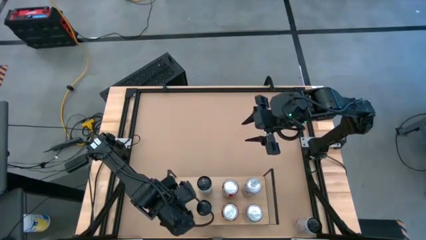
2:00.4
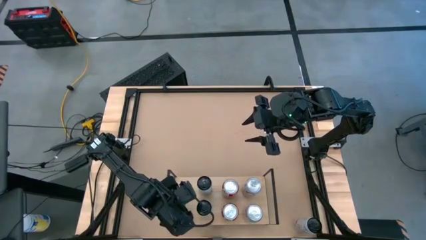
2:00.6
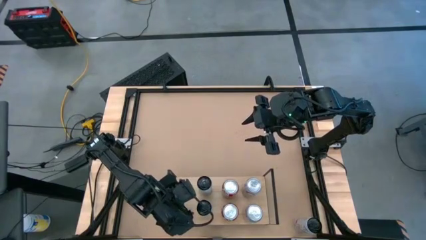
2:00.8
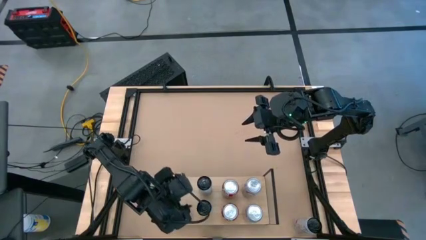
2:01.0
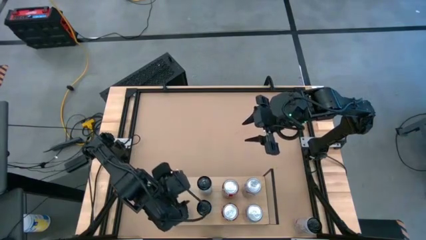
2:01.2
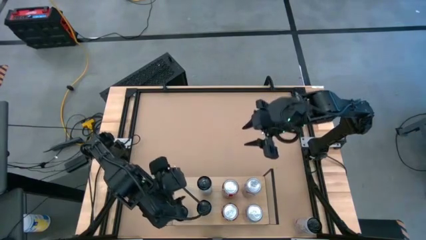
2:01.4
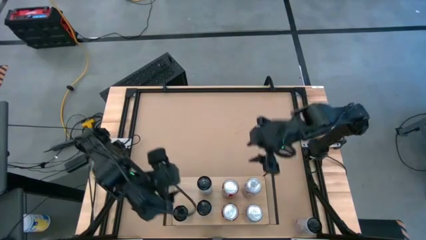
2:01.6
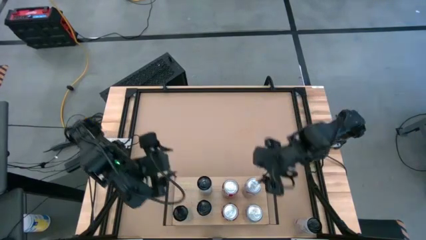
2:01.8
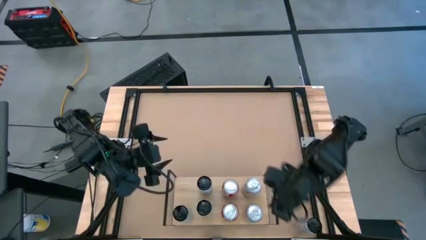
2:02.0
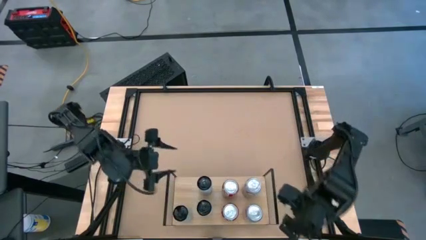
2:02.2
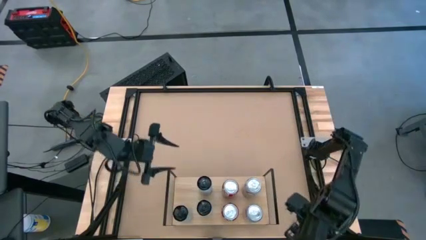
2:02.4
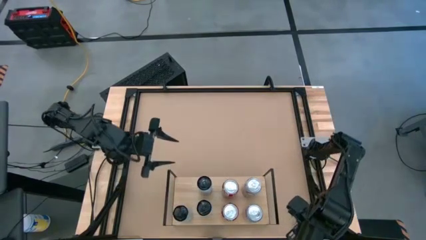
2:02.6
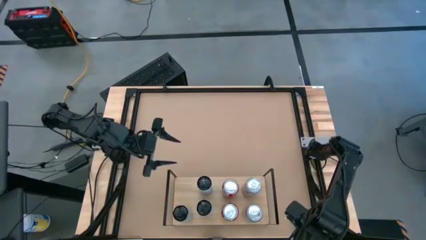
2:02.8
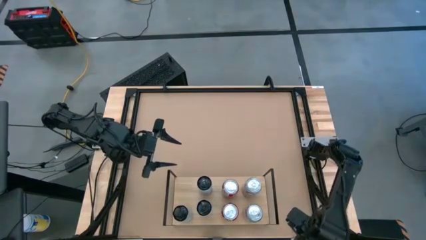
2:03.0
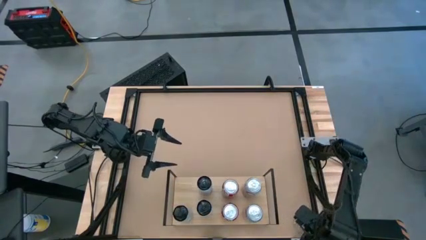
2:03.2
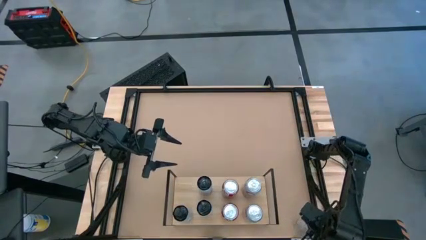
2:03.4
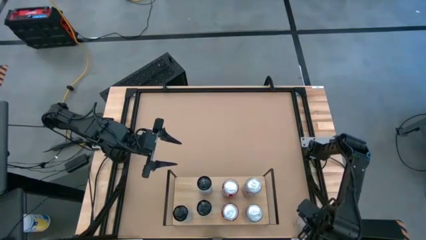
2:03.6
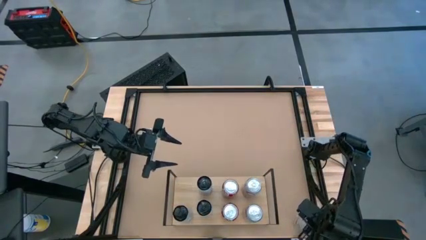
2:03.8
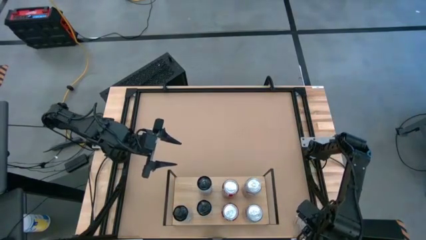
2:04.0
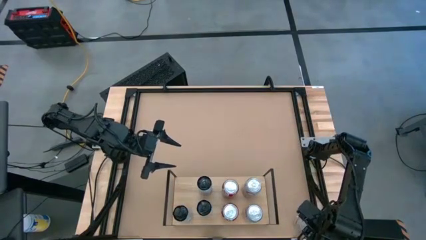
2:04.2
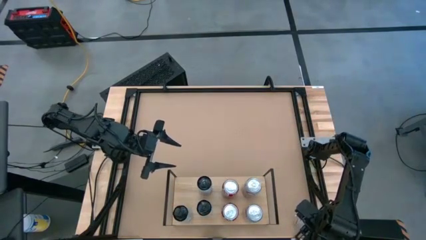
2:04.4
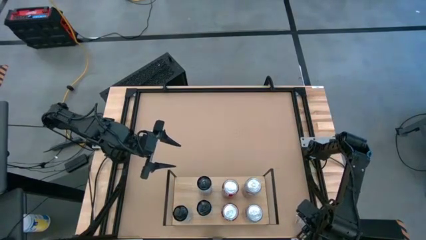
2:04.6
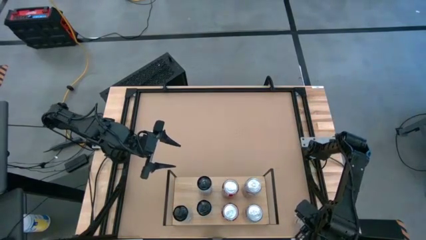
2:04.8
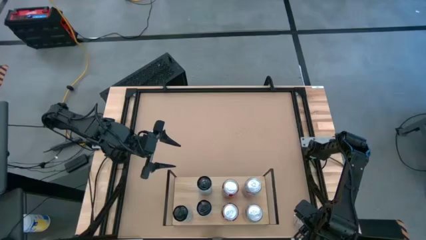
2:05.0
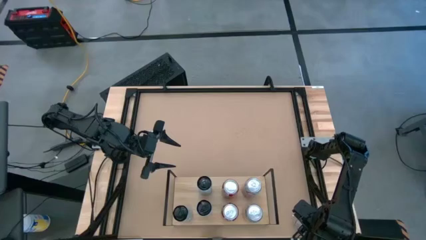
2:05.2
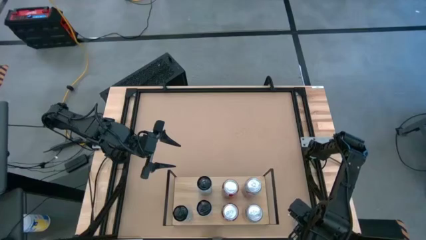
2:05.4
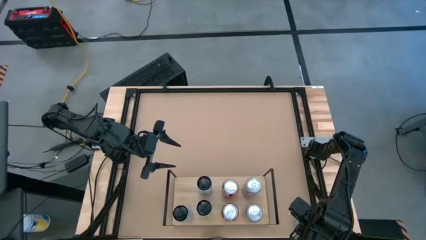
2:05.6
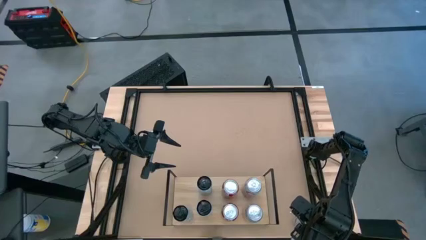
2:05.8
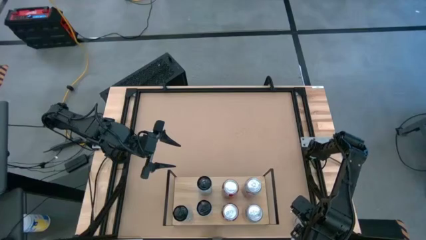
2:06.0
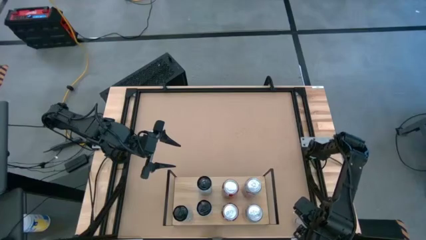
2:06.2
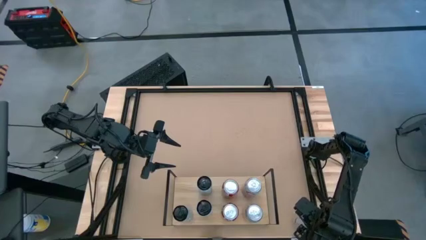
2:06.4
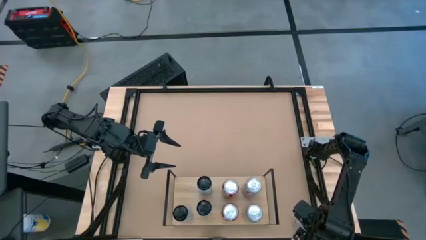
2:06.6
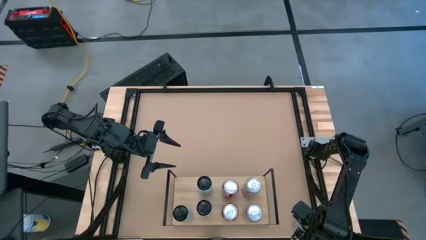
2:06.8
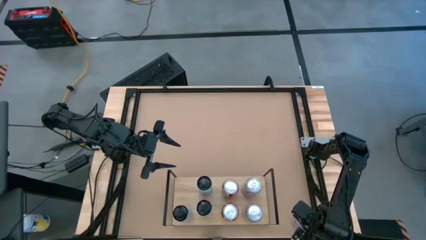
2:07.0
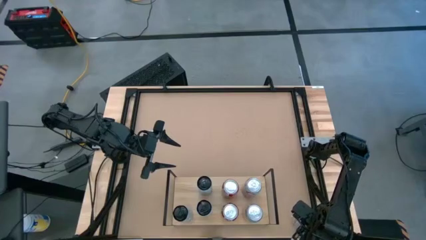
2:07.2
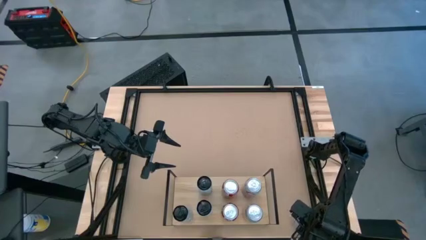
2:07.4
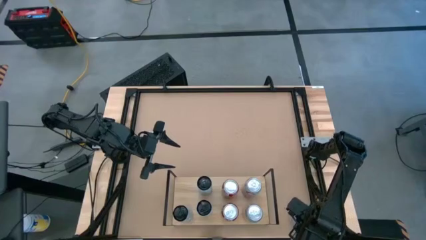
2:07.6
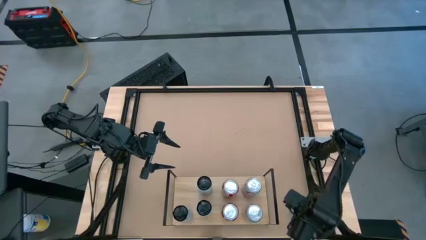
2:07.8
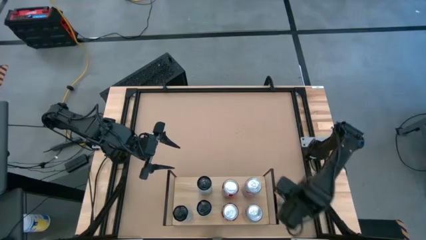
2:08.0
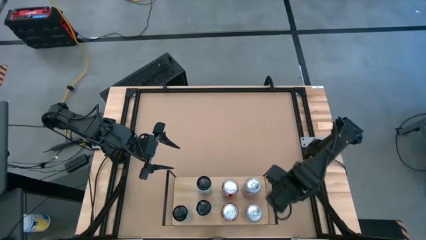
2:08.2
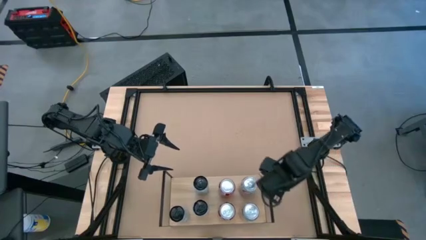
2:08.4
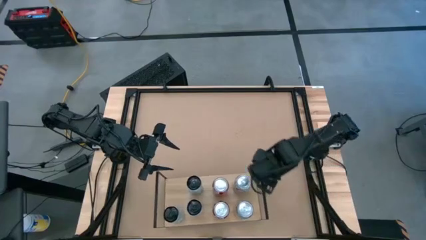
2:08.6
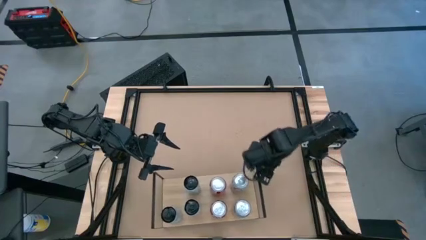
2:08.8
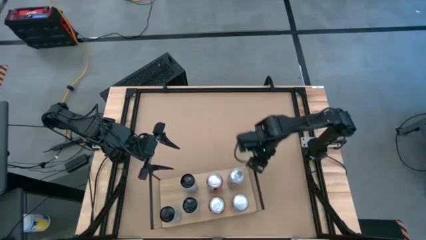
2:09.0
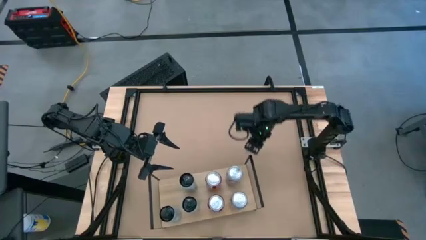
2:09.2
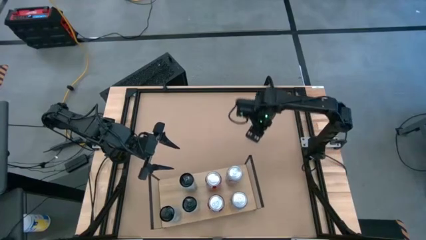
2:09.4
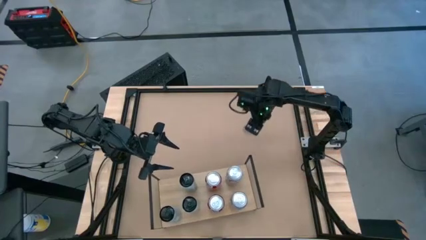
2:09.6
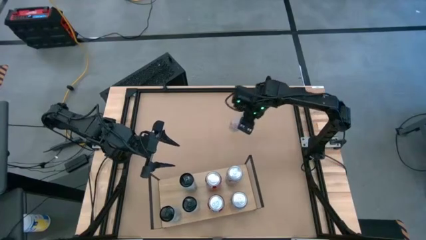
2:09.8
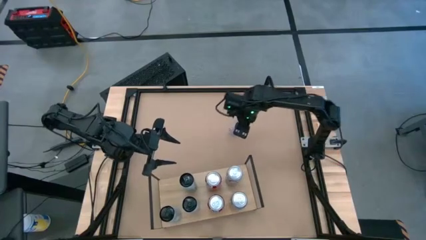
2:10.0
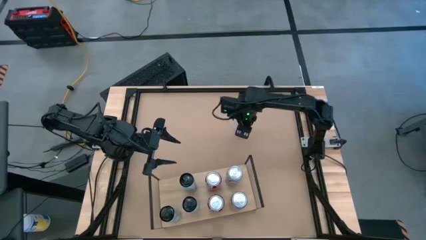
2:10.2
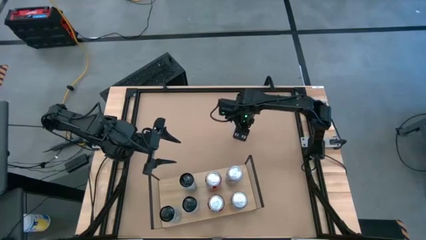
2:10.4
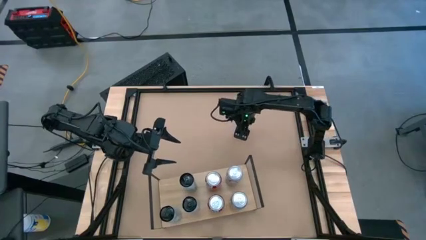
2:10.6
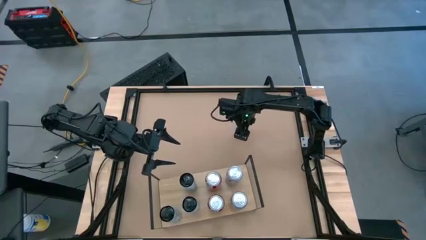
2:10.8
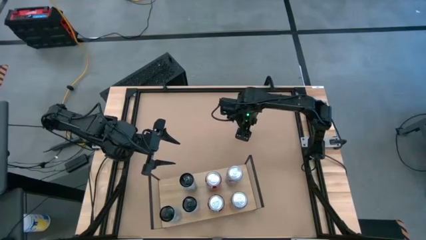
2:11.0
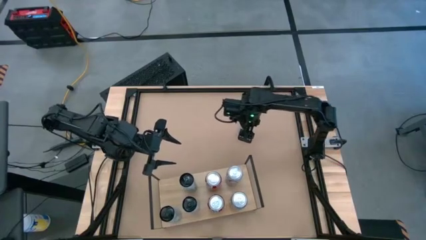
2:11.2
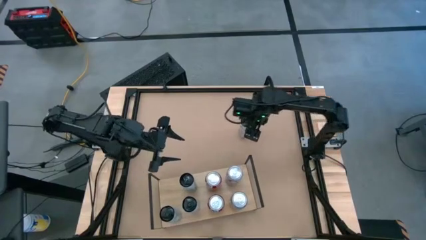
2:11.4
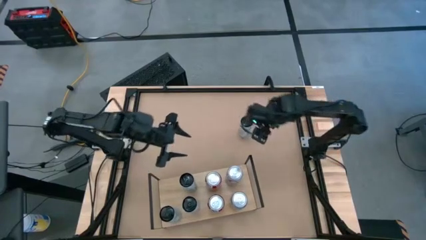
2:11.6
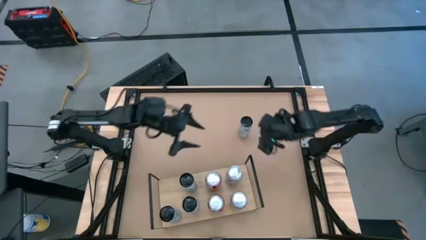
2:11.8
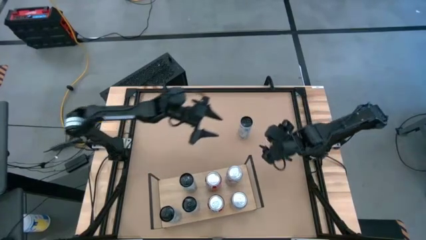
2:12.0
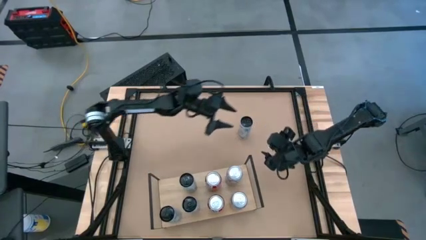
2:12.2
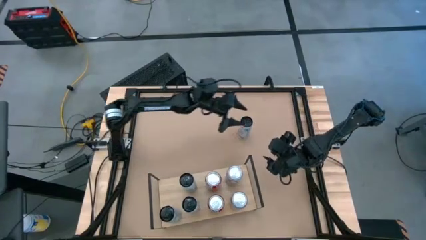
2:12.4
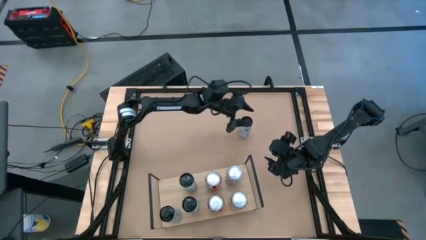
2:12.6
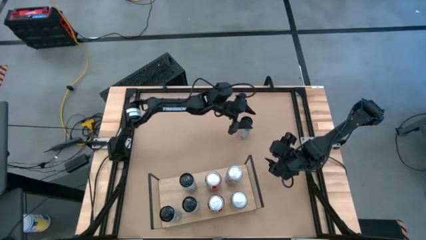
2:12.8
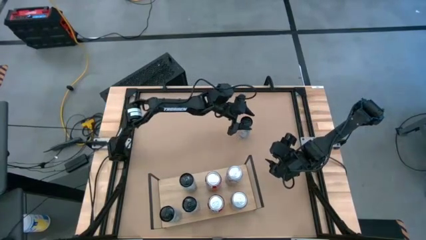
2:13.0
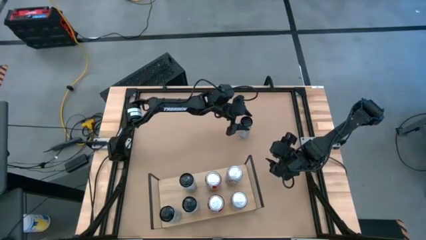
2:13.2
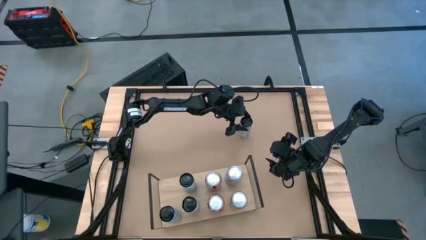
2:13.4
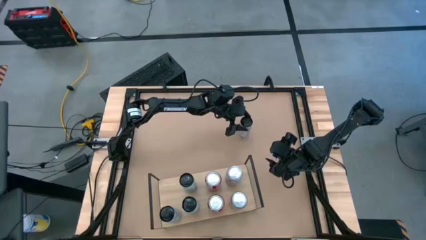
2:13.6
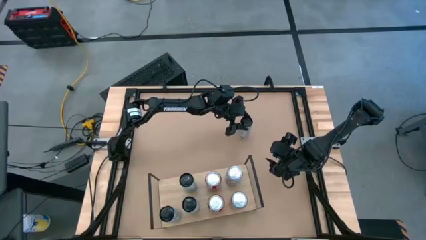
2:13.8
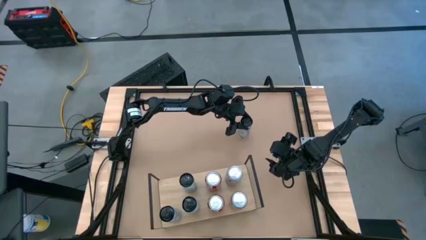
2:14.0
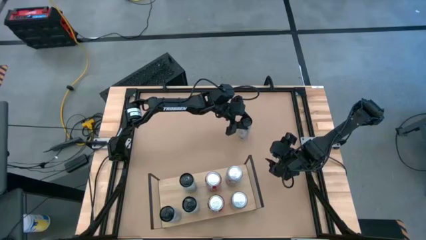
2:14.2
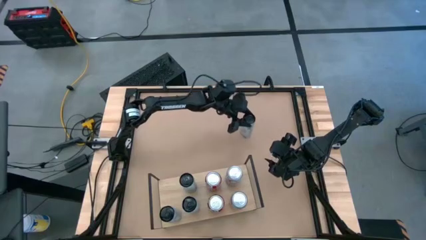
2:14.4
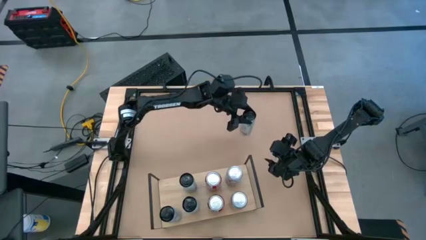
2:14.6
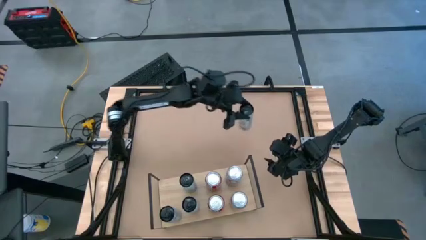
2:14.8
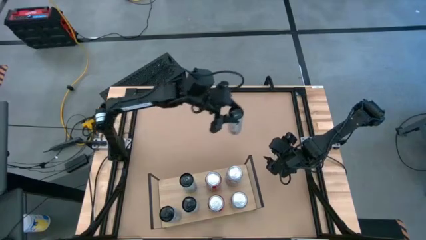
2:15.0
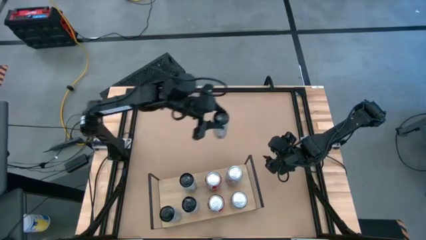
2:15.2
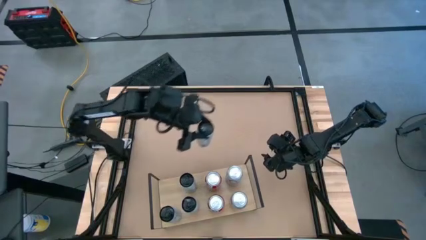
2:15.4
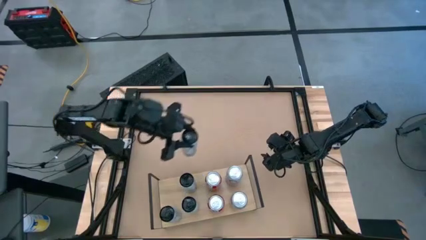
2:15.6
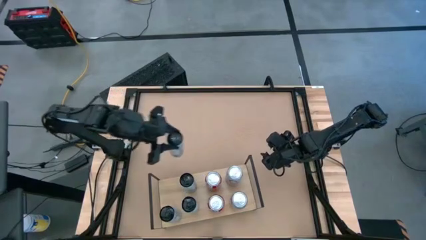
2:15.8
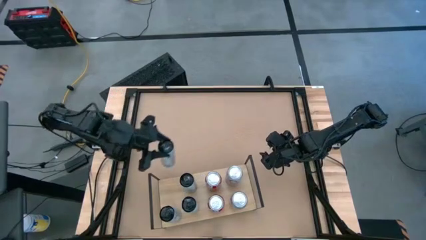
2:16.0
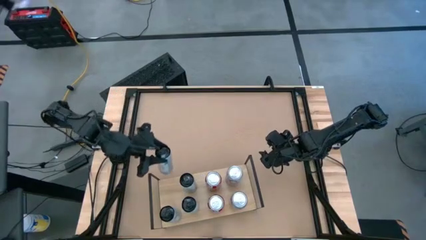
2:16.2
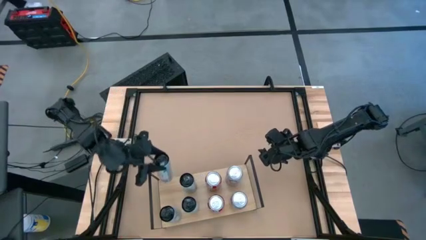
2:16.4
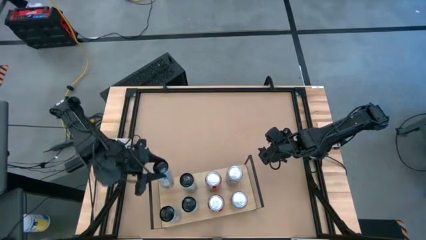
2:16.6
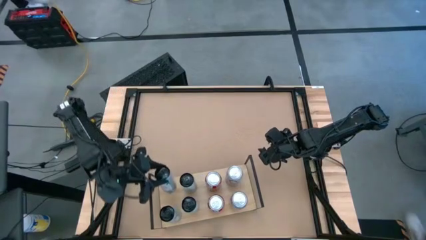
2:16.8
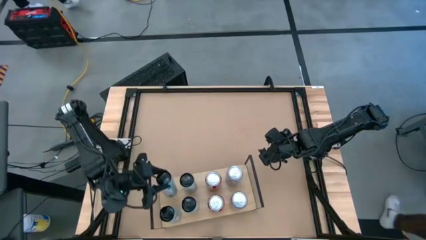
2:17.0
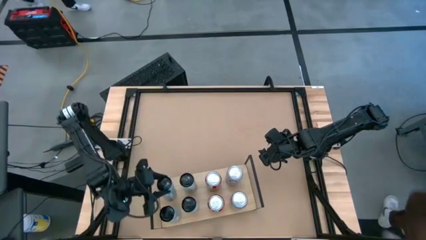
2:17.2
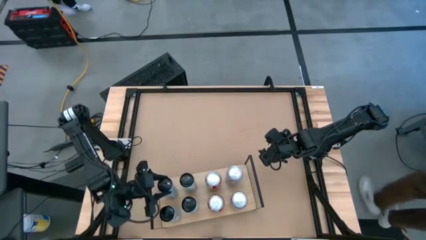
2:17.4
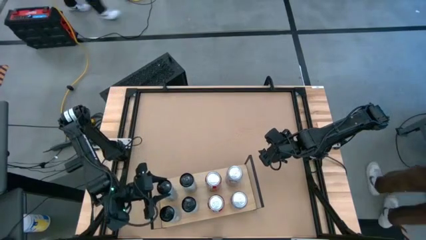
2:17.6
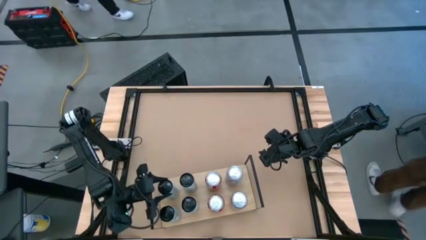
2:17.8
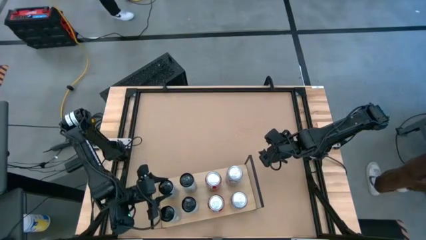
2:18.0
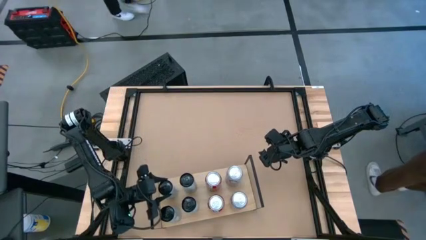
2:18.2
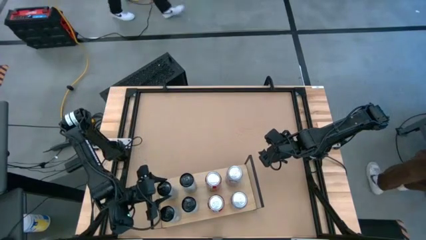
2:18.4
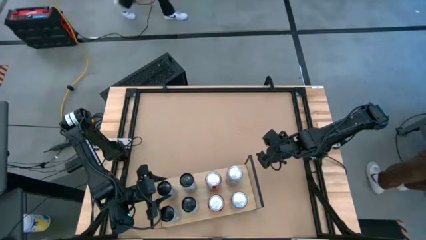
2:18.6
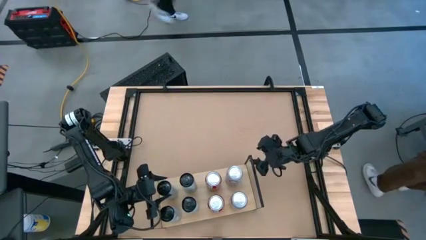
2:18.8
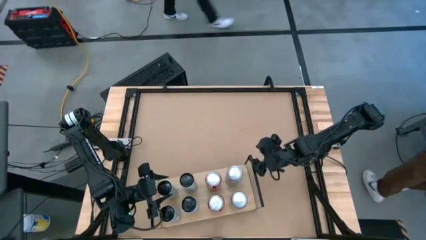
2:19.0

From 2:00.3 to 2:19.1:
Task: Place canned beverage on shelf
Put the white pink soda can aligned with the other white pink soda can on the shelf
